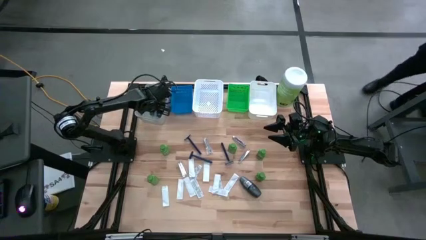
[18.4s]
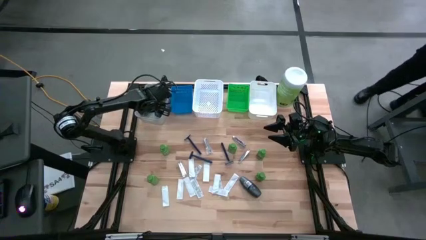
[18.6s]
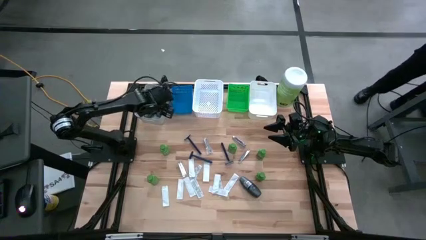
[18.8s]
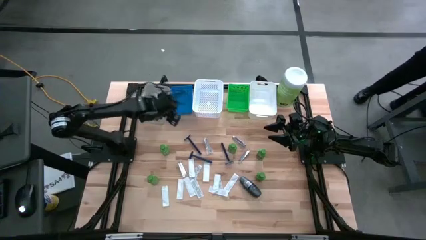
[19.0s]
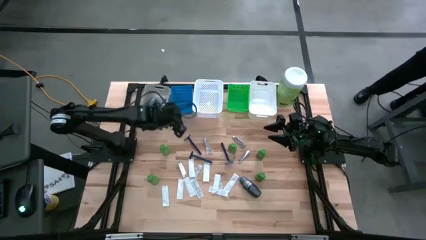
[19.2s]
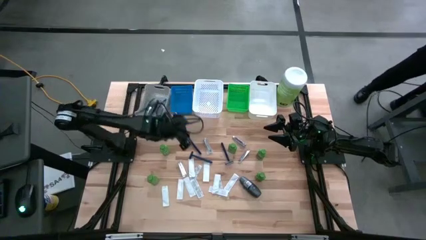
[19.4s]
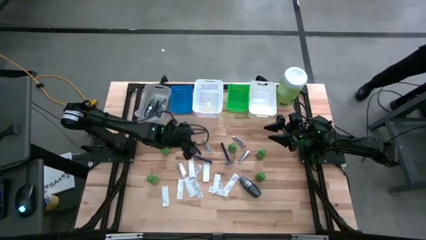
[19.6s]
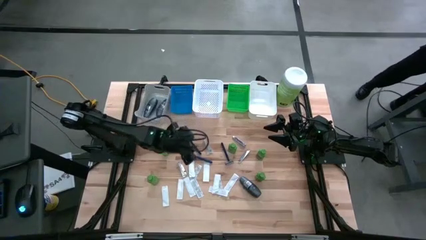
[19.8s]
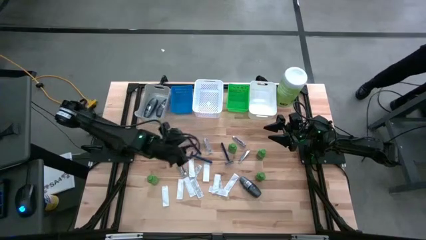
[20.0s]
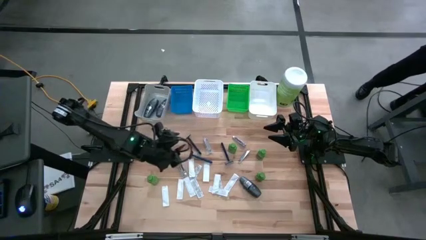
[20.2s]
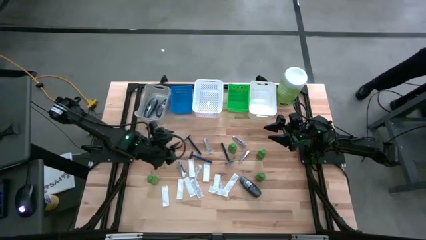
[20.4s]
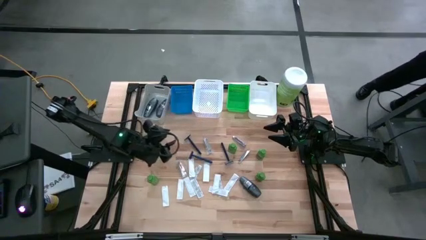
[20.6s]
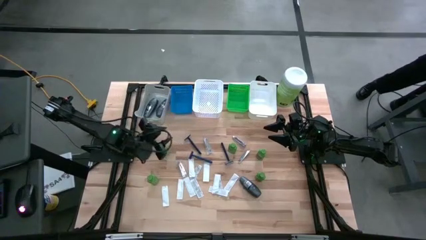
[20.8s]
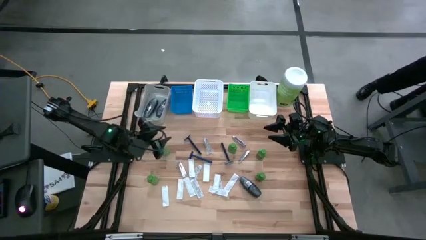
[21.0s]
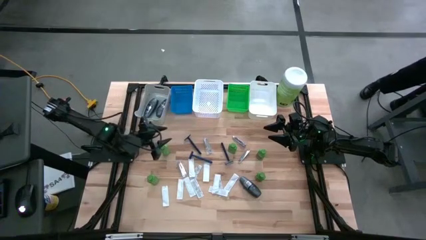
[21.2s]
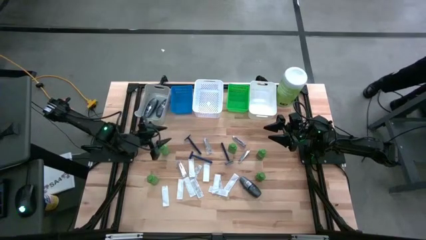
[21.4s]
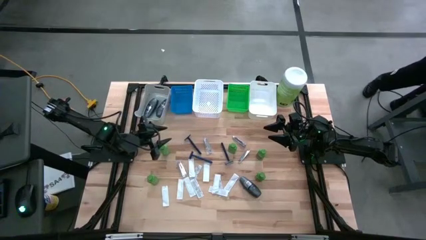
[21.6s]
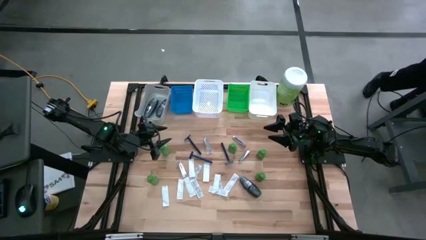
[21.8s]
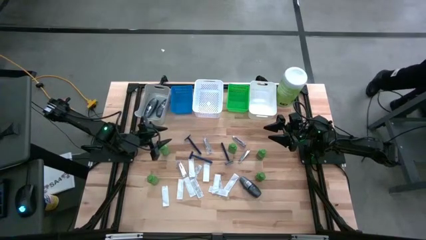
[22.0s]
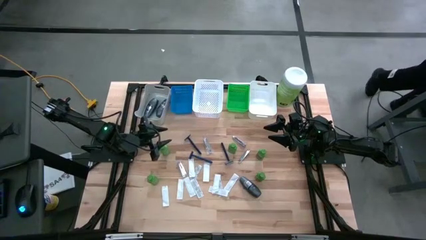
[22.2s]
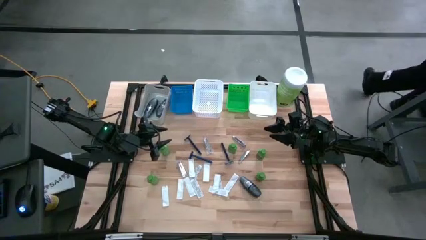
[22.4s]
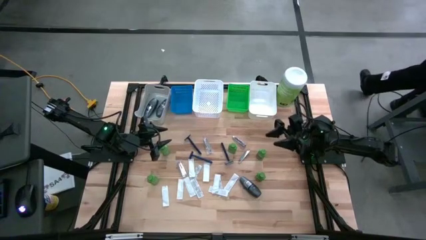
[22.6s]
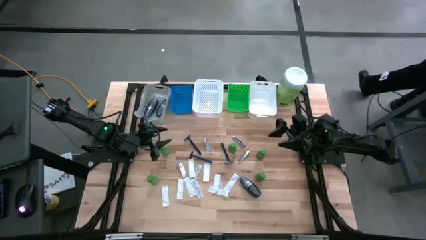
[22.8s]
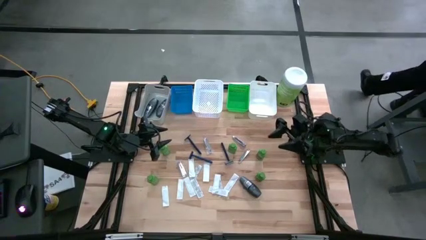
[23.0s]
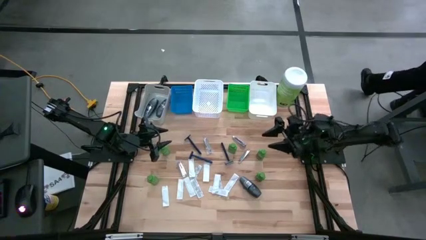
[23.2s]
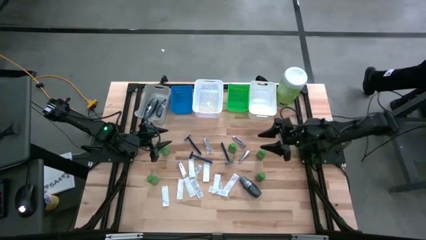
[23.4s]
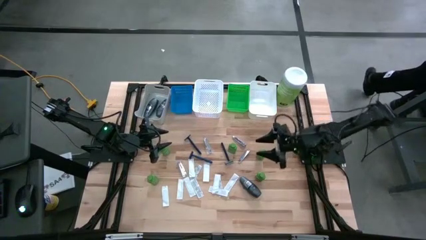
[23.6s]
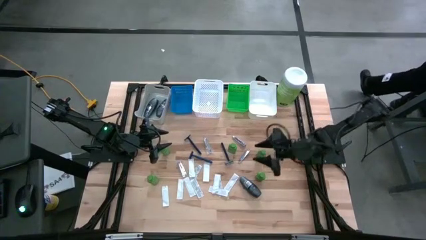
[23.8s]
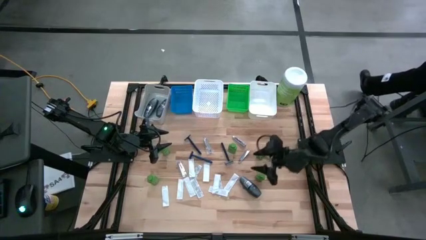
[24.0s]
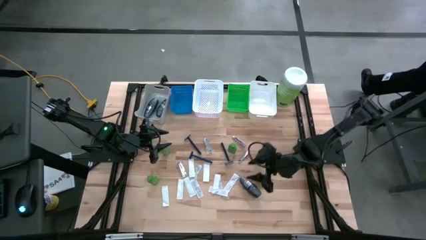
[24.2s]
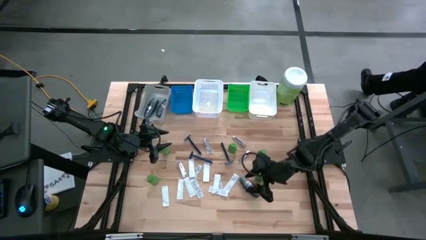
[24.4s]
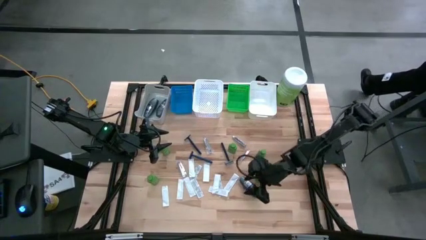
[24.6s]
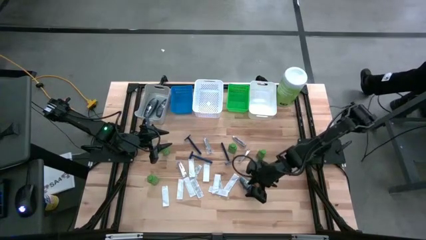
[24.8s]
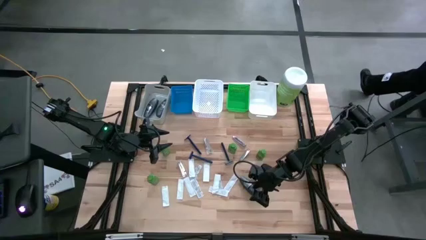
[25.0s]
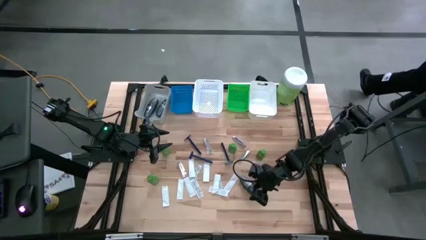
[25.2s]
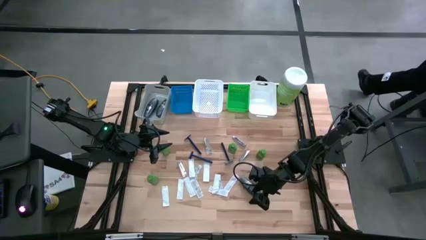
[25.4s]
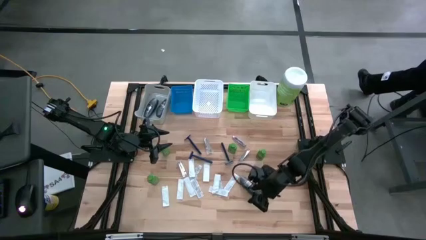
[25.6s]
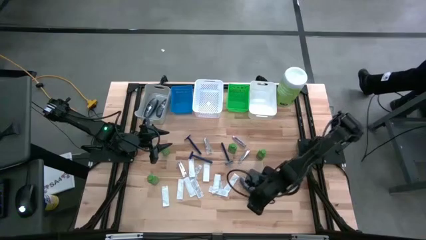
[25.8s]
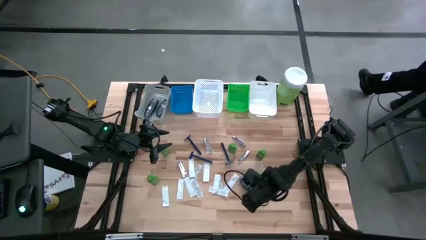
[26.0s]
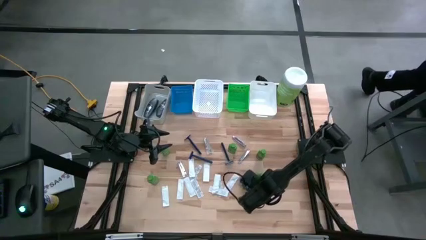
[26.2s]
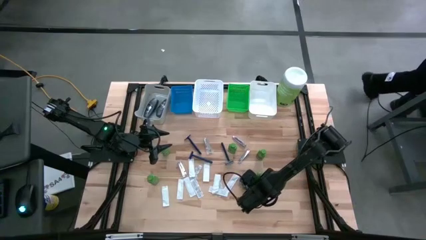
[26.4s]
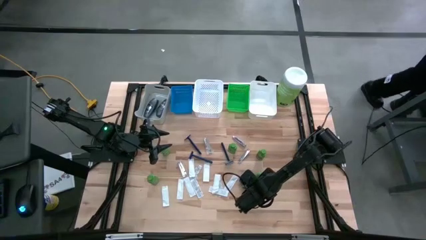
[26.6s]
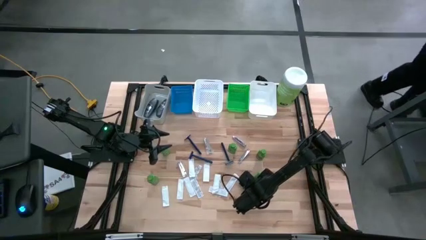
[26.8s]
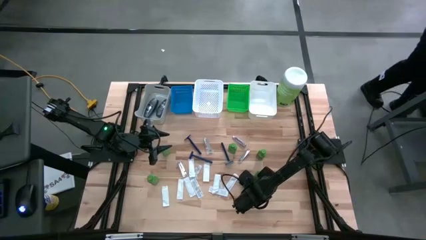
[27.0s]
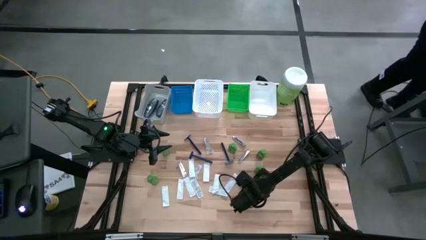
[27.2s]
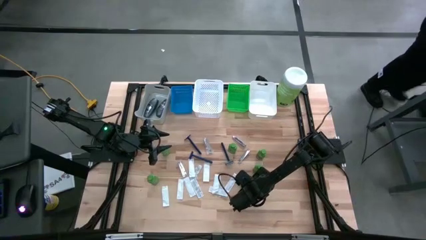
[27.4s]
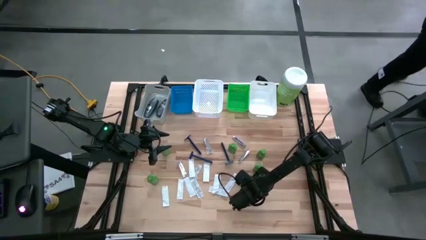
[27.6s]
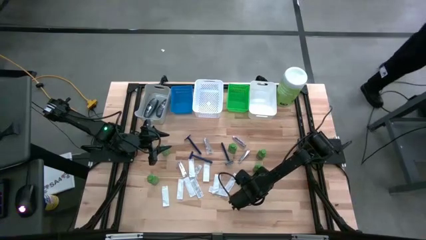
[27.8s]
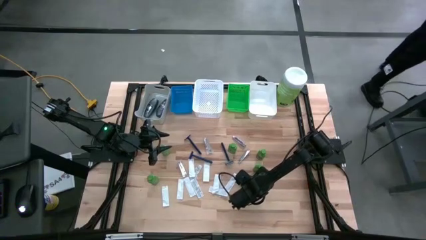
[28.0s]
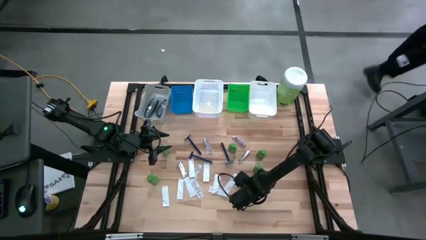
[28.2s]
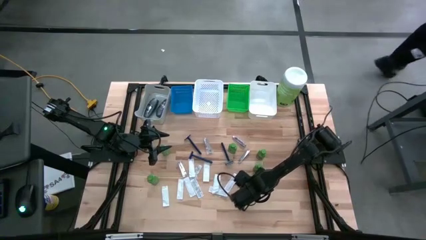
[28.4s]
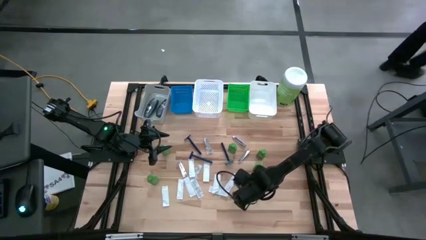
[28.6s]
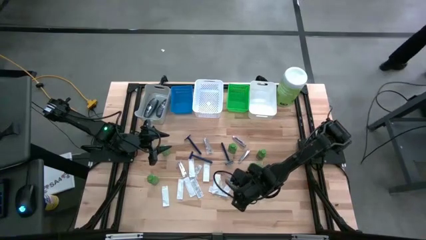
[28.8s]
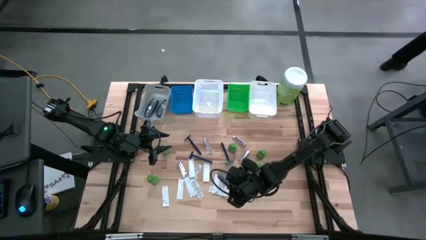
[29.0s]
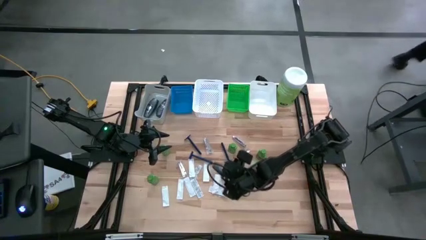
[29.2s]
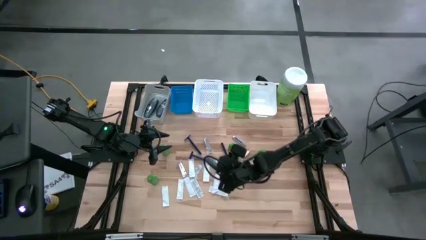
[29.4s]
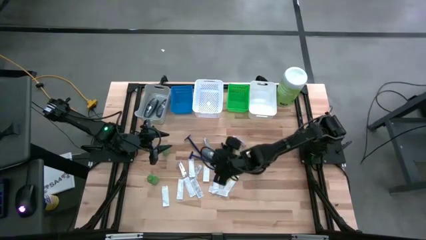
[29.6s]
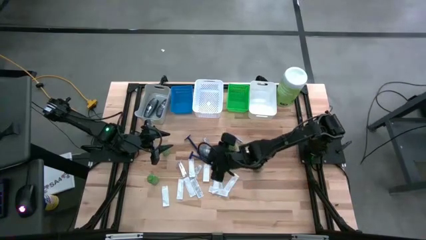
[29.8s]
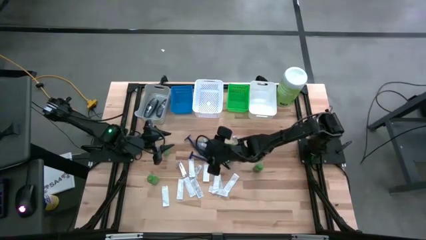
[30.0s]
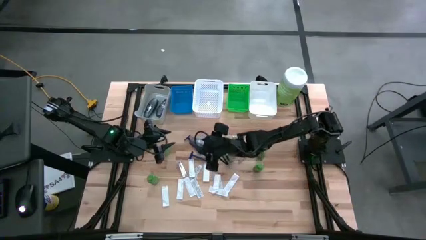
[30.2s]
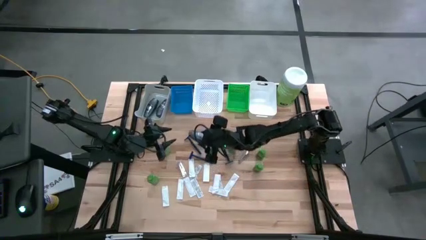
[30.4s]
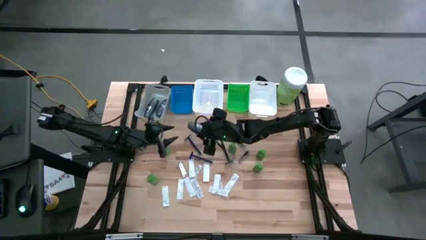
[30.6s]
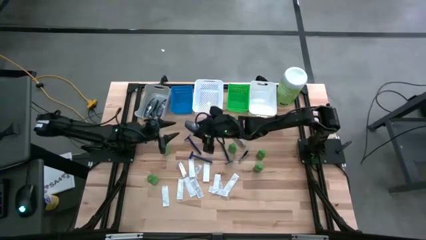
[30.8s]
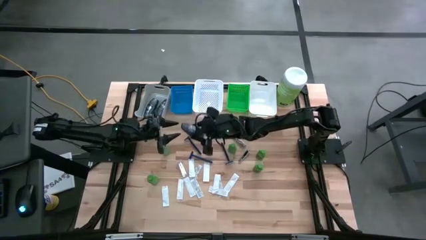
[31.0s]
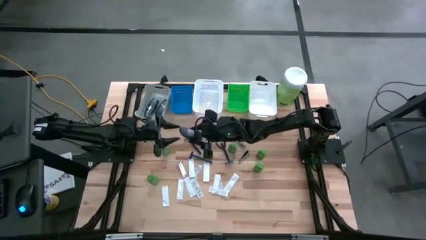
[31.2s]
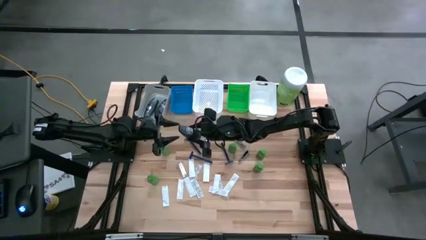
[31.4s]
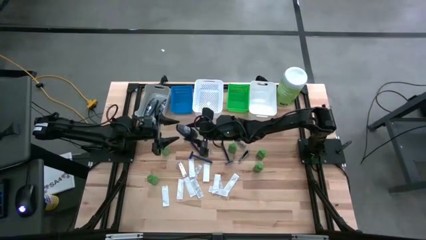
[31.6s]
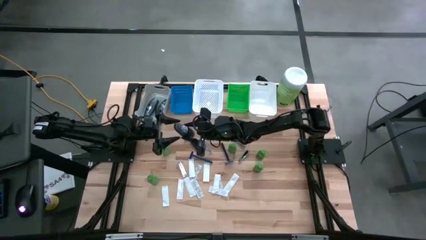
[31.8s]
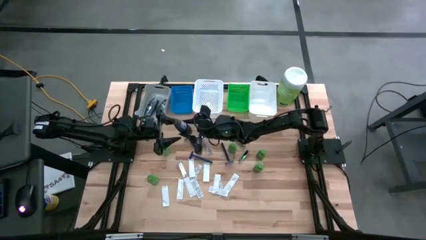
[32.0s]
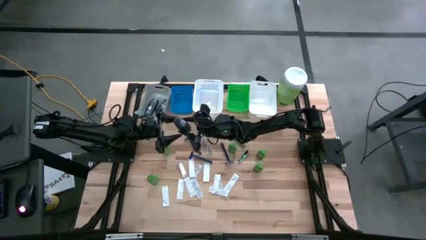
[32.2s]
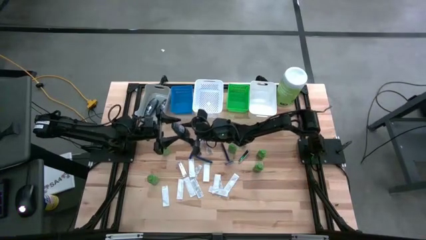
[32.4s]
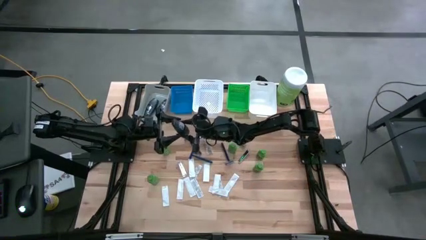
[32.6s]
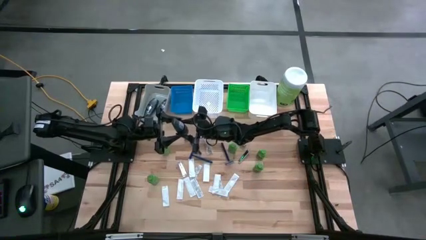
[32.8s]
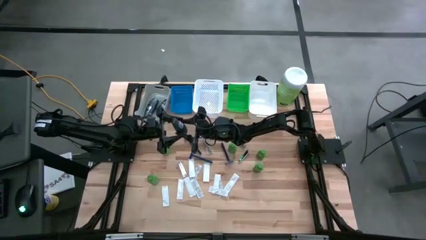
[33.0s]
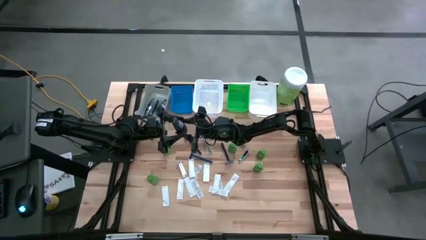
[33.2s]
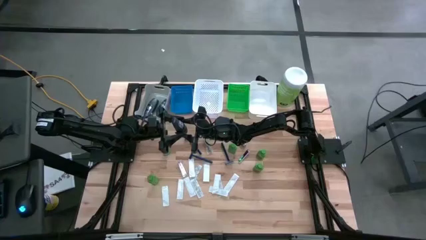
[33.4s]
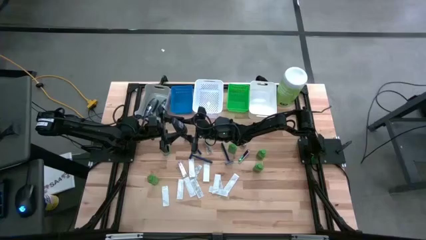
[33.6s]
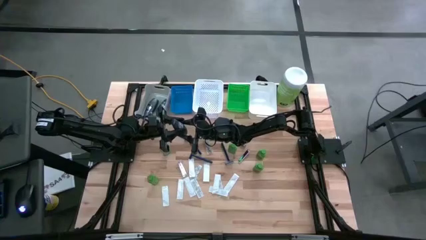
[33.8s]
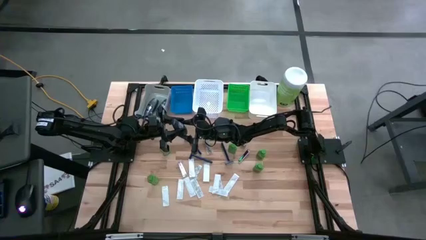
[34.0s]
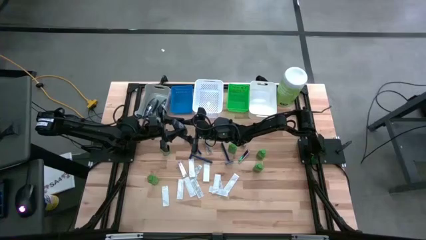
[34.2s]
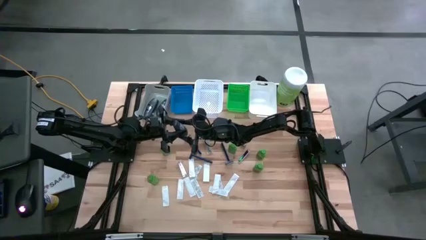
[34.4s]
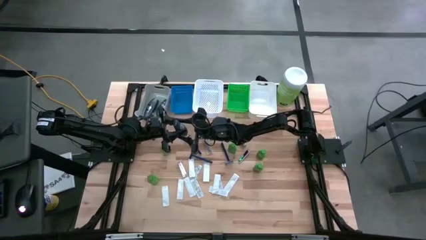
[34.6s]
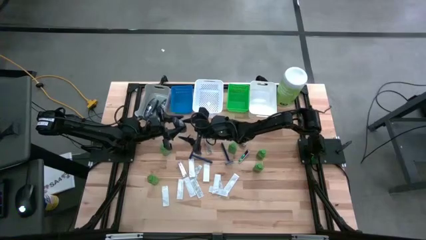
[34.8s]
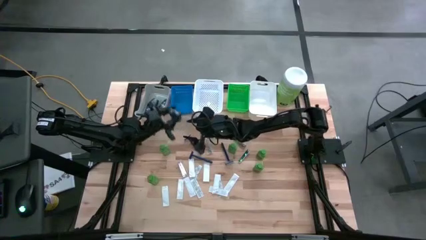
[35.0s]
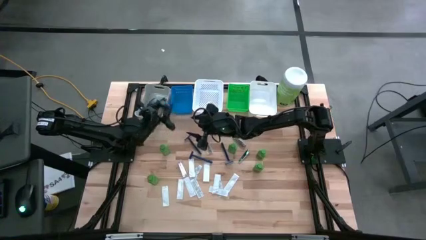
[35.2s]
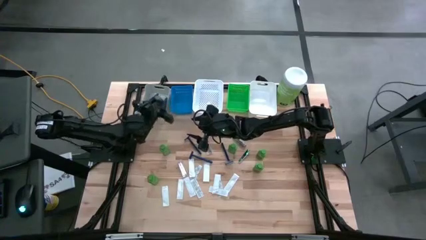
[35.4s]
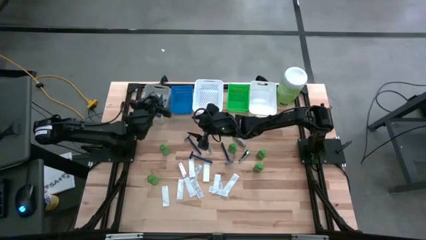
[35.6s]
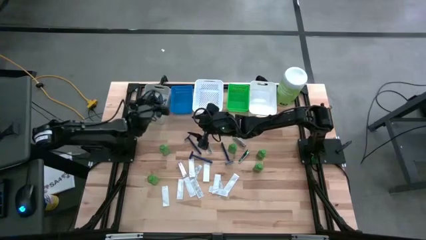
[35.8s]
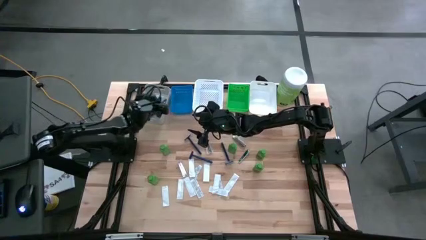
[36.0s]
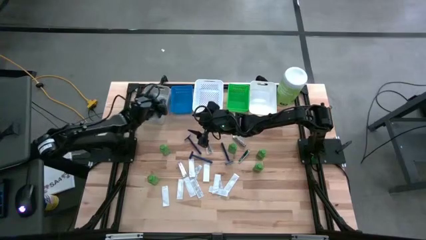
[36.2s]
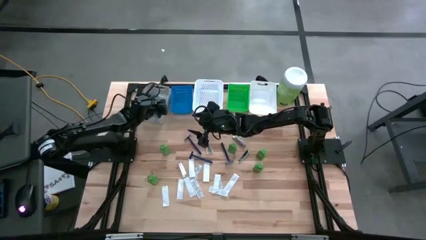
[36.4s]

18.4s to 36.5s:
Task: Pick & Place Travel size toiletries
Put the deodorant into the gray bin
